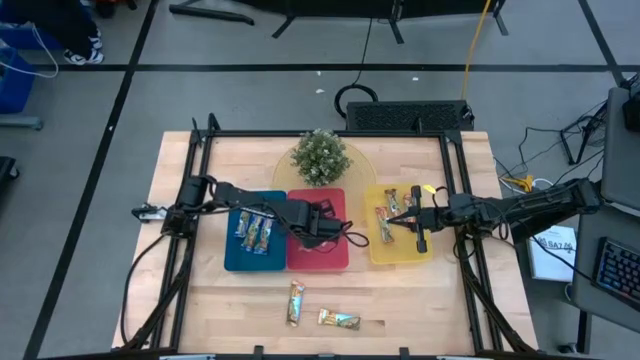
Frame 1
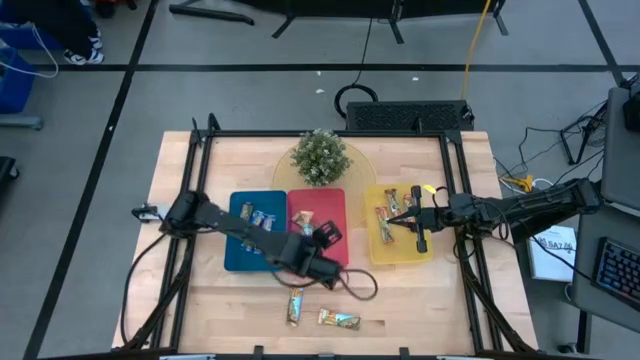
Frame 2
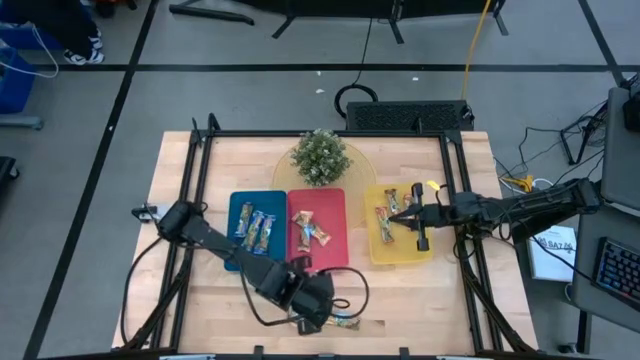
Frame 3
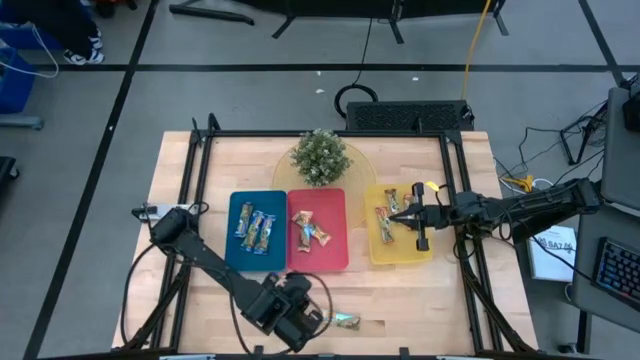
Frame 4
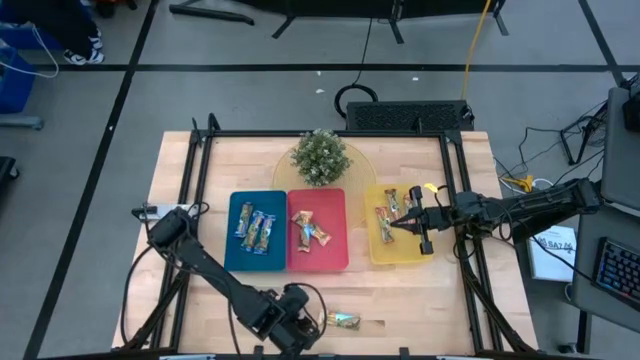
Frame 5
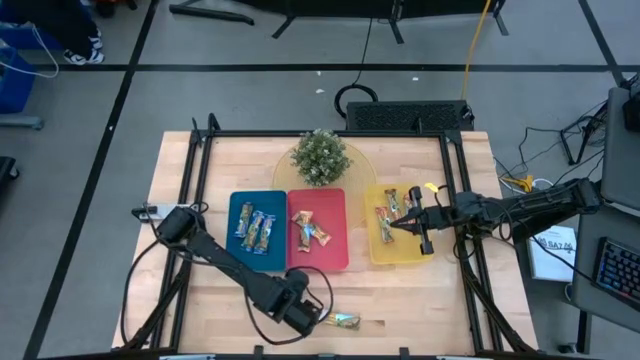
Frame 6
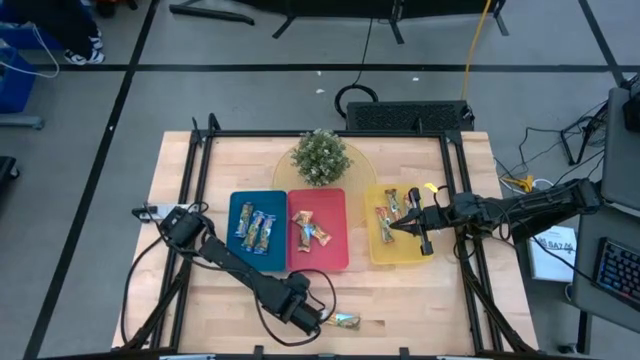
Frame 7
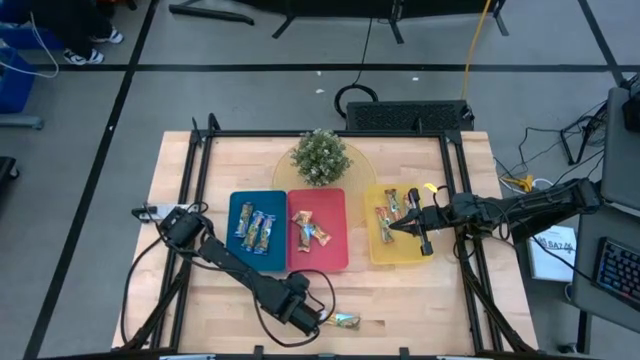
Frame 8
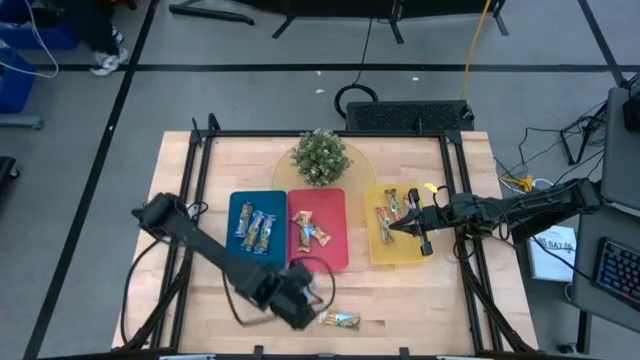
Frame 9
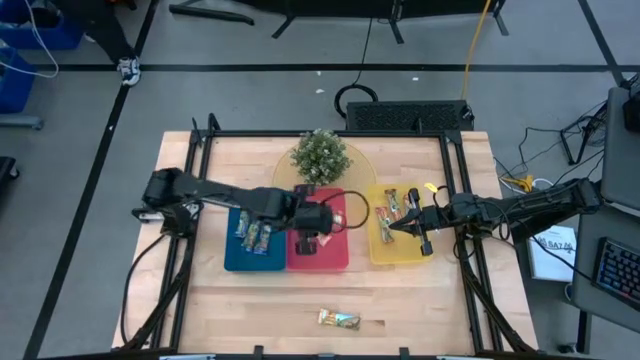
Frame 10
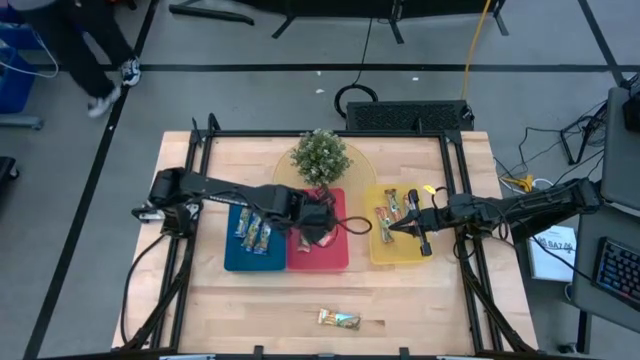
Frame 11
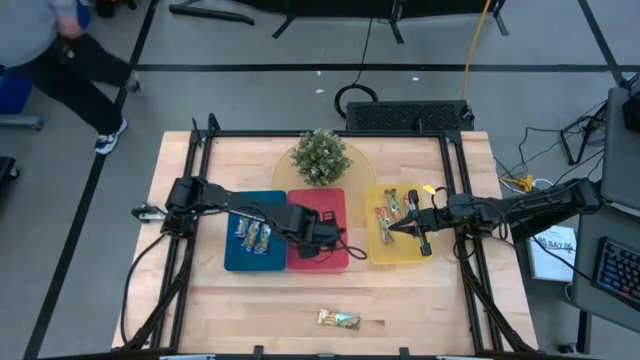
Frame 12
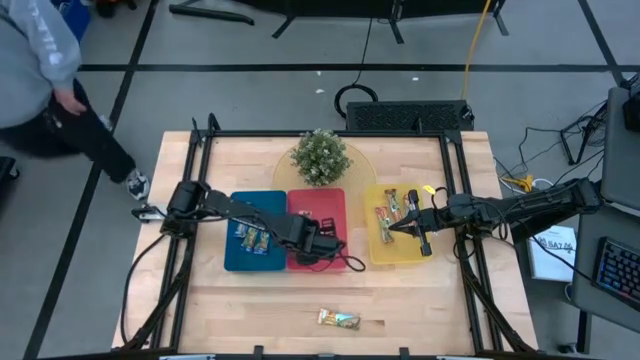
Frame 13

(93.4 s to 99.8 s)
Task: Pick and place Granola Bars by type
Put the left yellow granola bar into the red bin

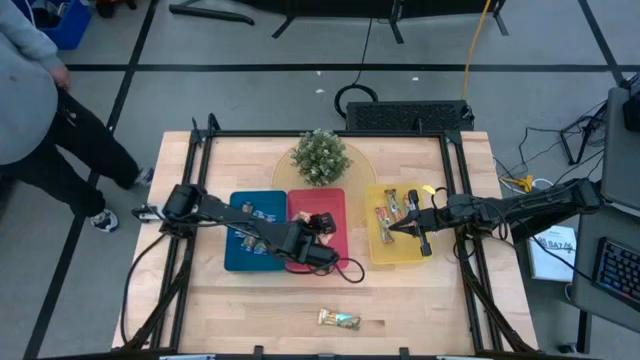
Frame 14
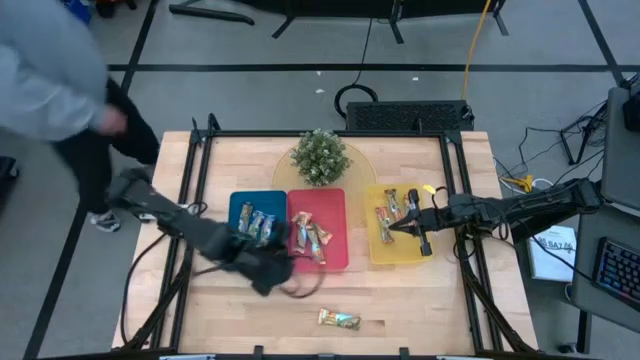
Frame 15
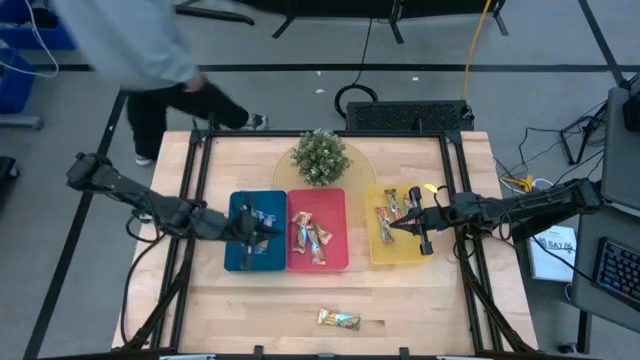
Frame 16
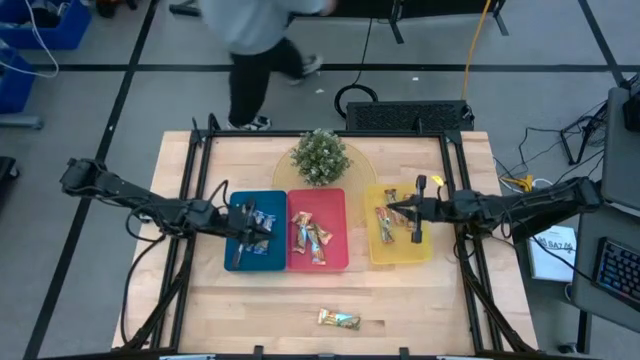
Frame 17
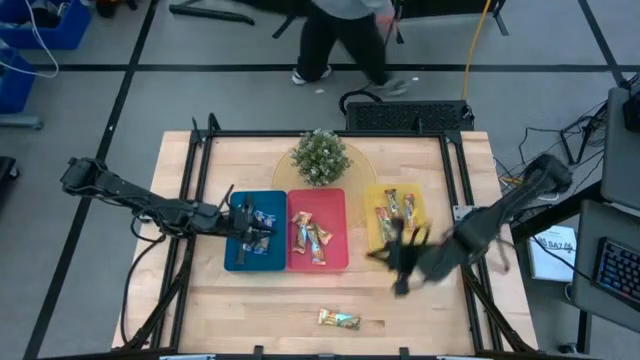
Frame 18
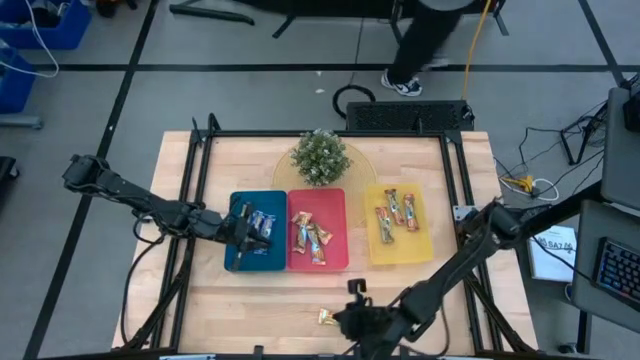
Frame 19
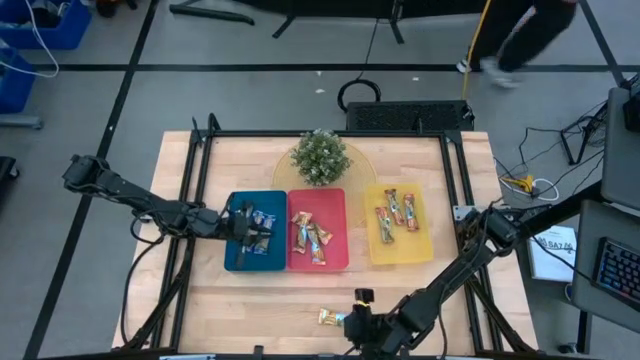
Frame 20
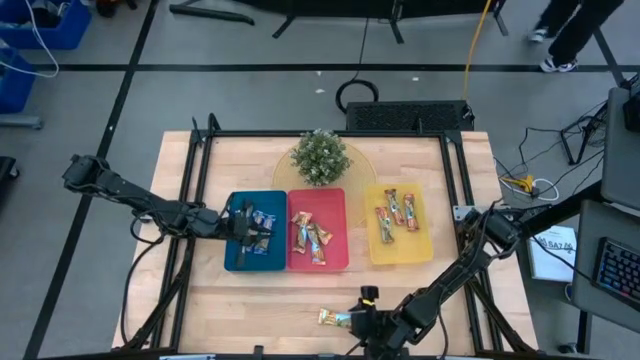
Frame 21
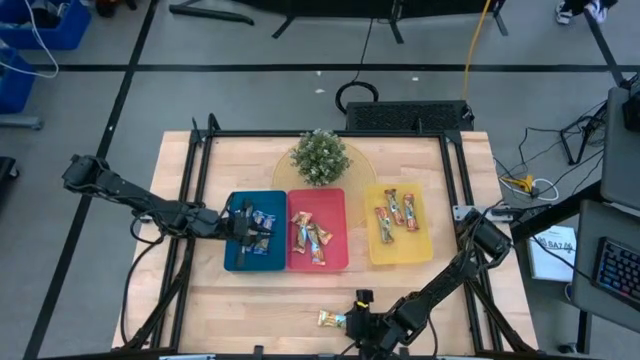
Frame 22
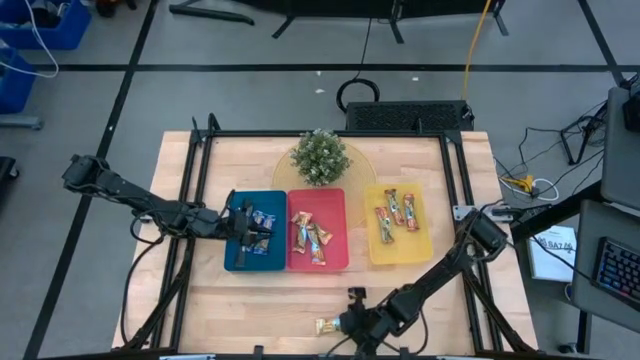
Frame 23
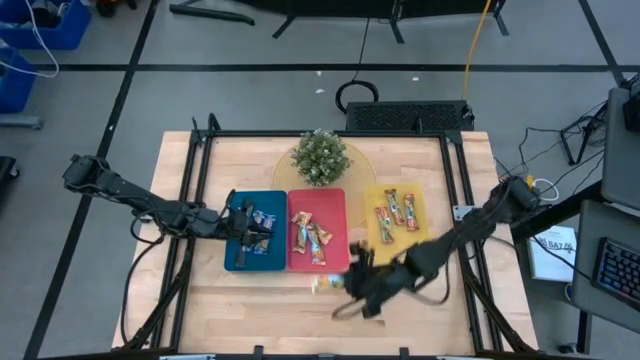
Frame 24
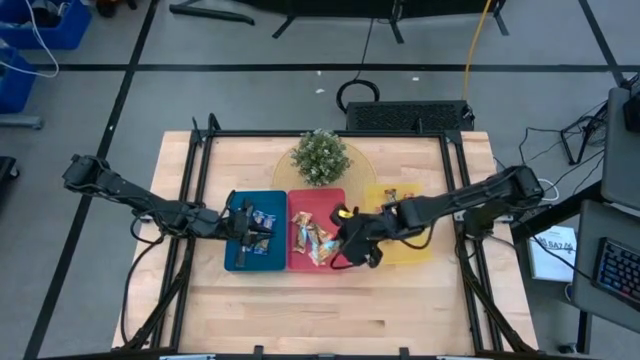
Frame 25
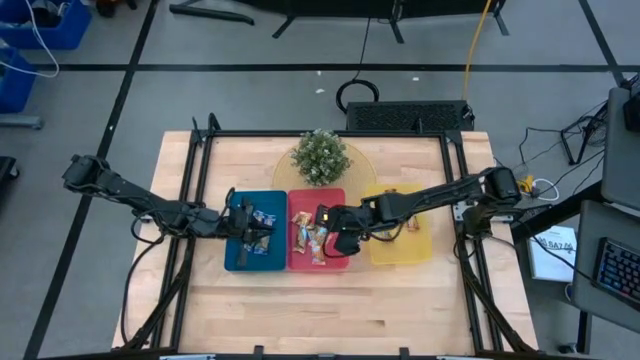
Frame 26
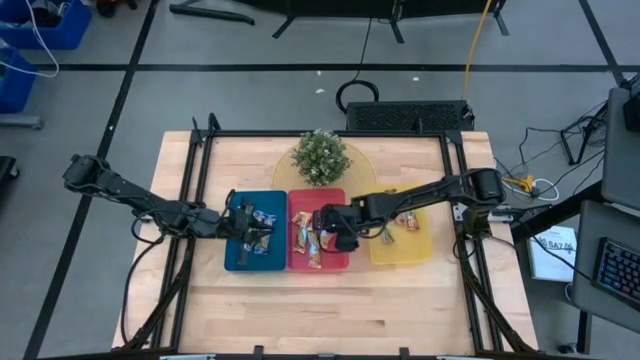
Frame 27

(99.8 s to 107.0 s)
Put the yellow granola bar into the red bin

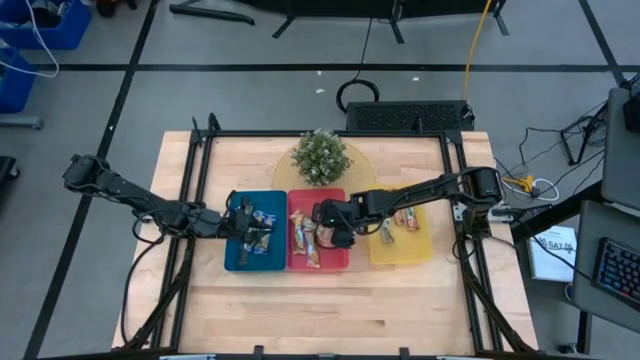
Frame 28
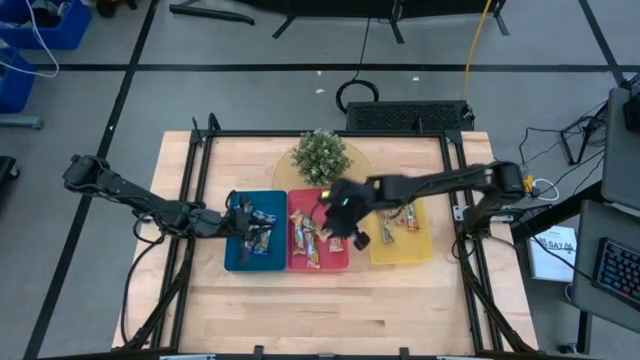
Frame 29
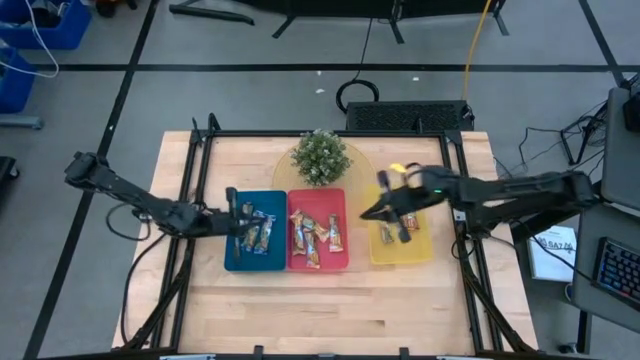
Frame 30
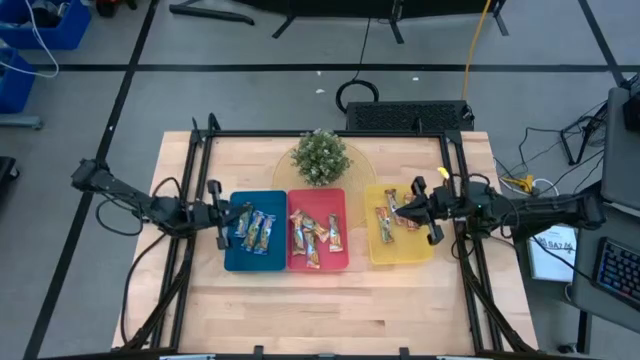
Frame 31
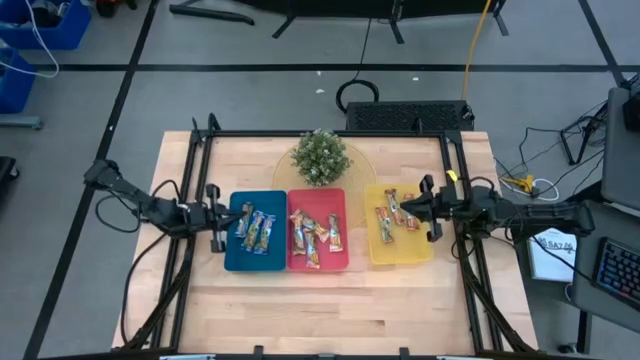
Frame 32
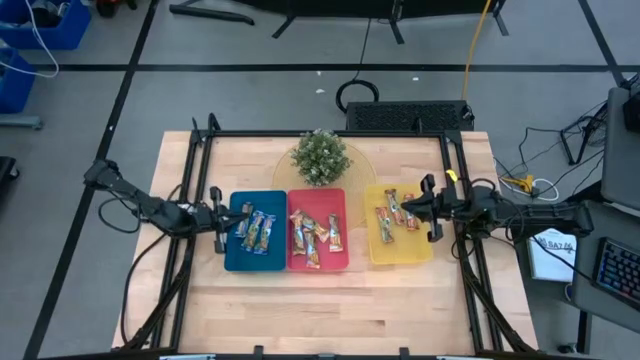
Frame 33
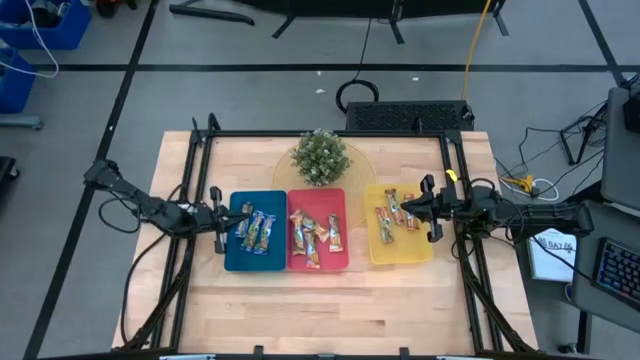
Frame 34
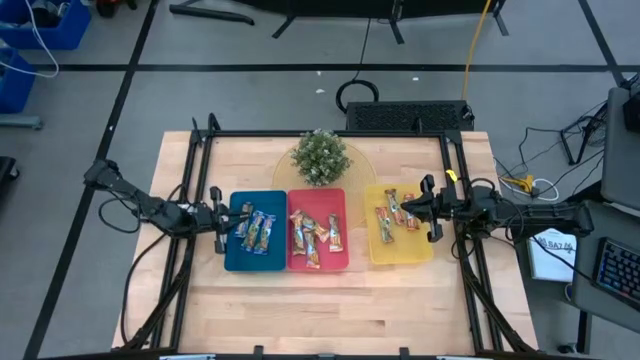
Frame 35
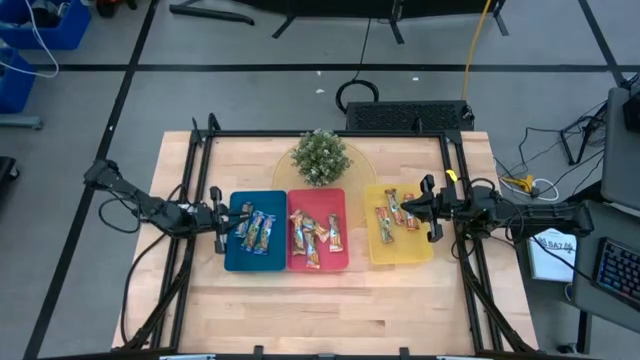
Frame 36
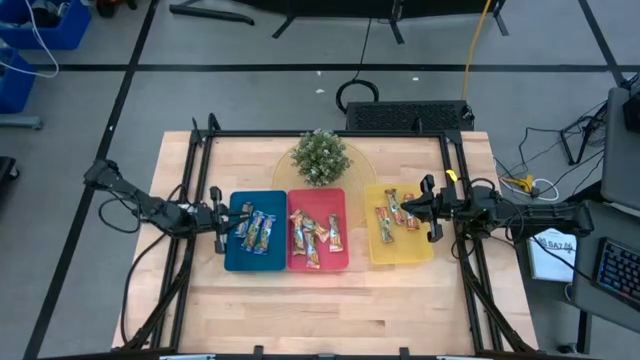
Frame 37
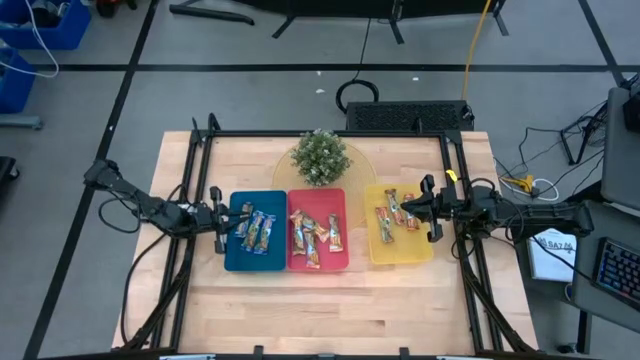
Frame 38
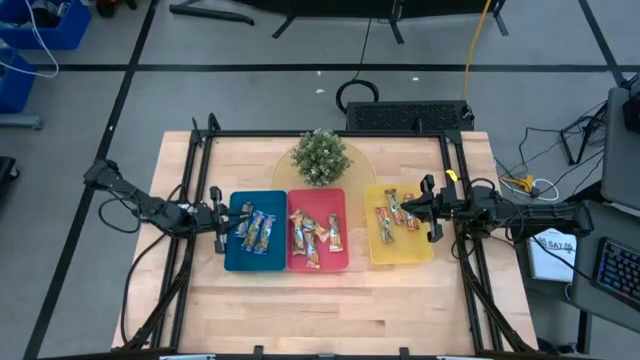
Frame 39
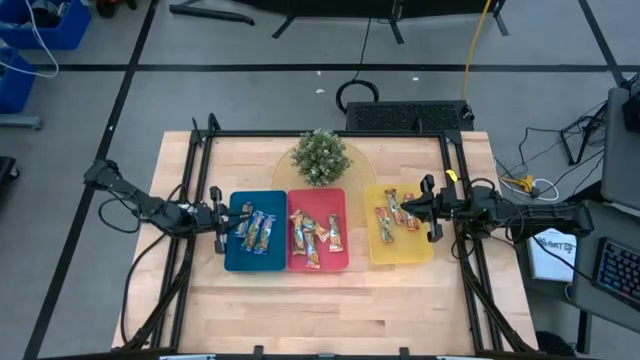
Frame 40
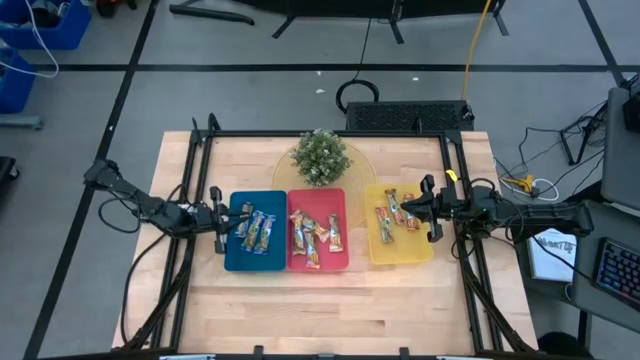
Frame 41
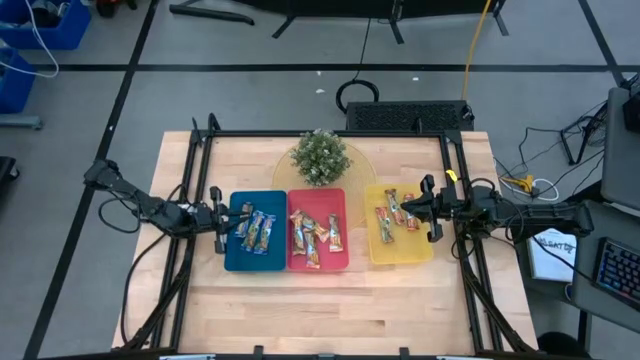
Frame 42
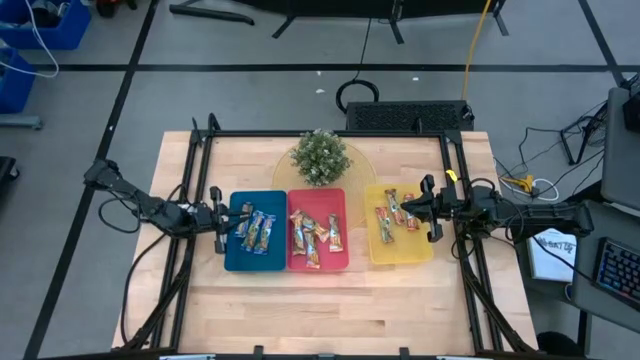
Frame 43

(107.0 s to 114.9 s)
Return to Home Position
